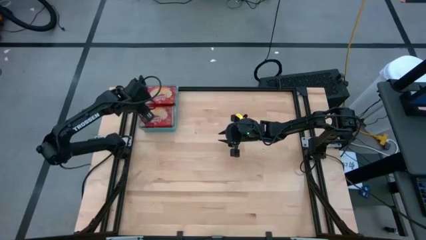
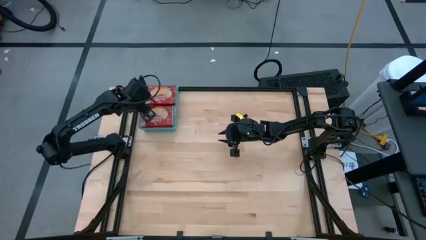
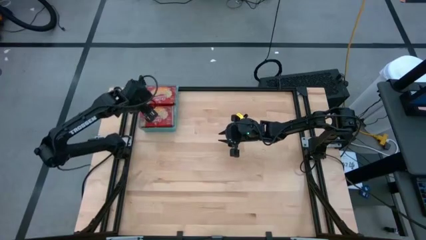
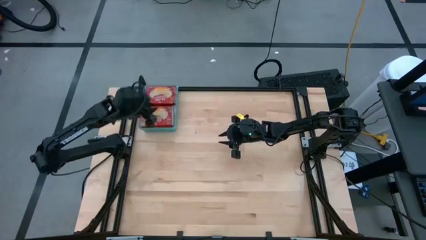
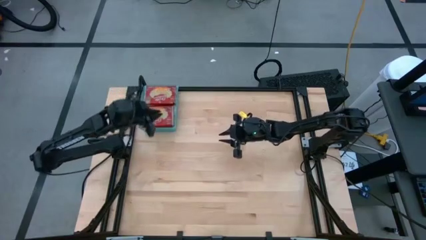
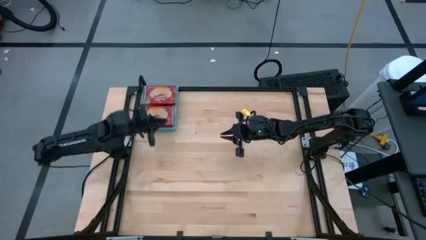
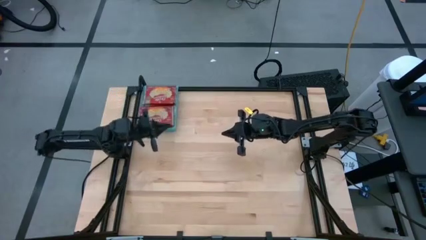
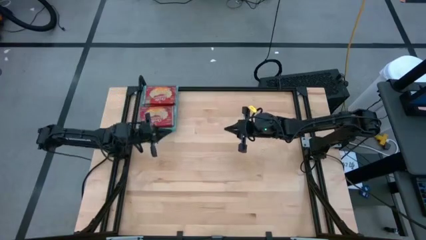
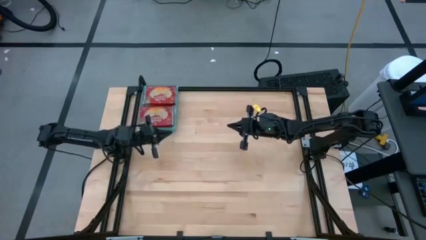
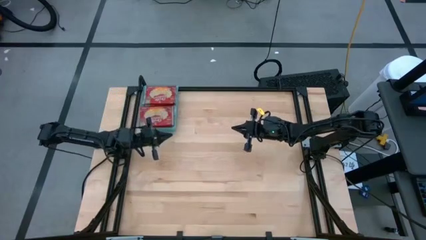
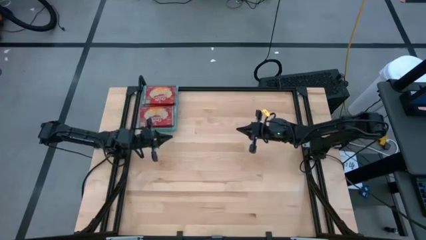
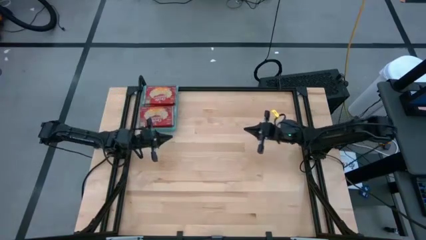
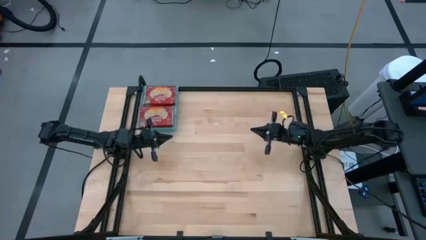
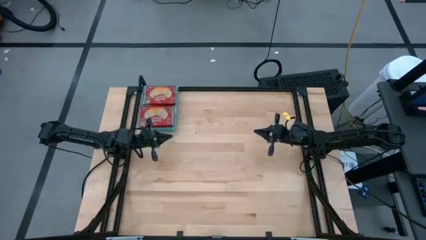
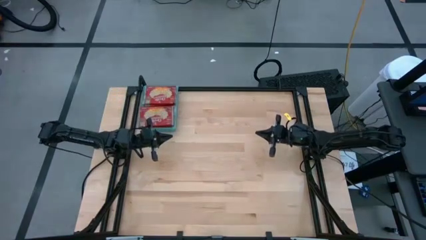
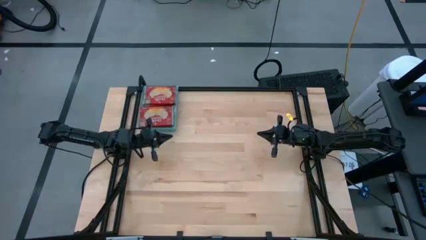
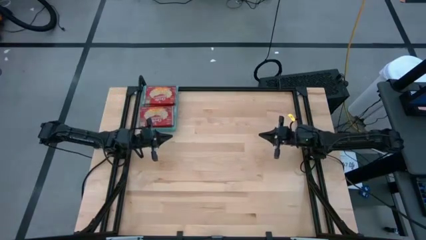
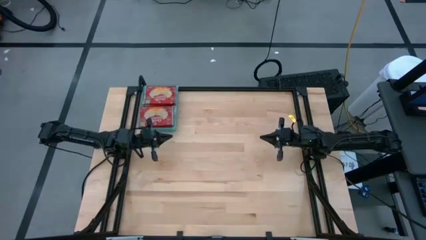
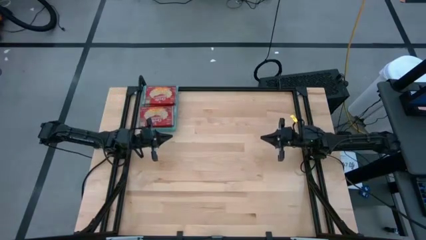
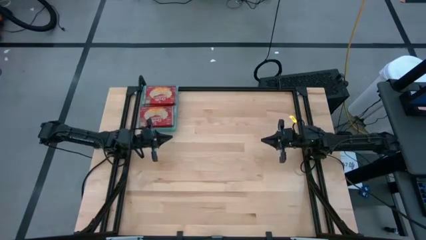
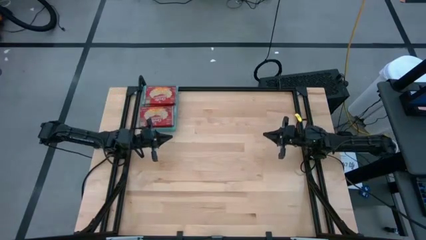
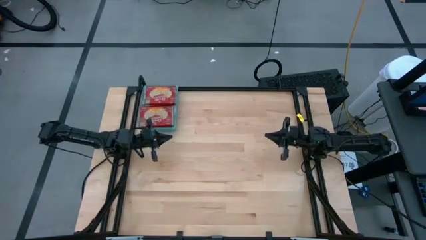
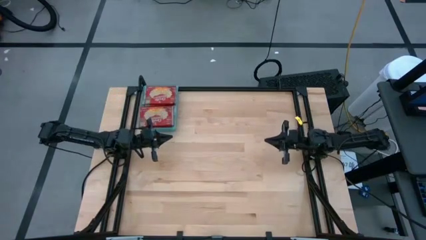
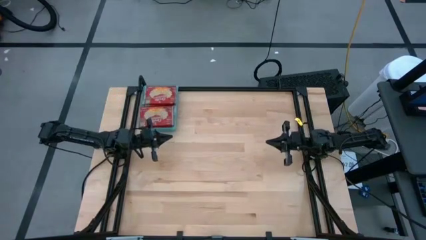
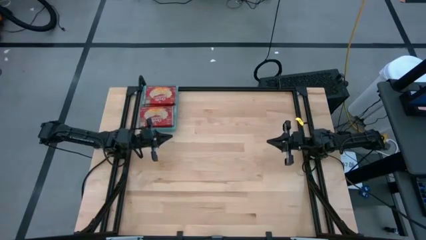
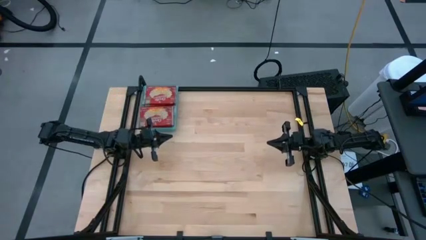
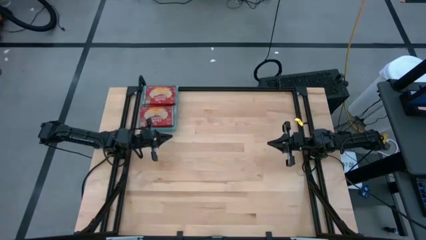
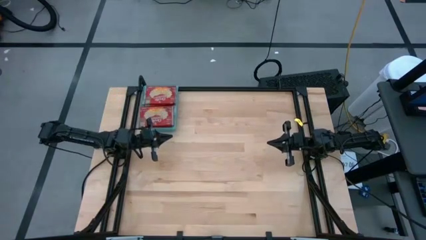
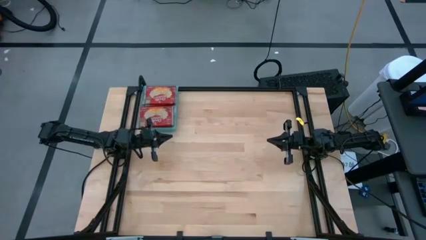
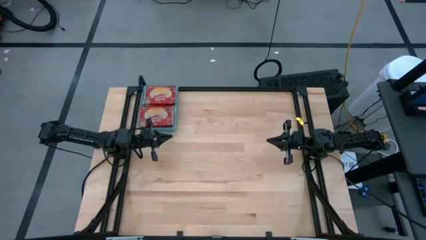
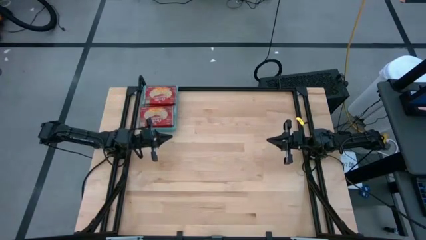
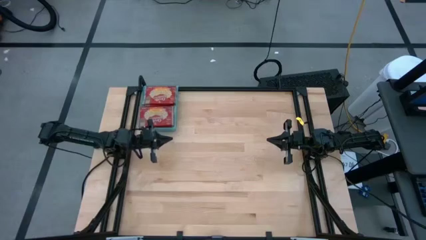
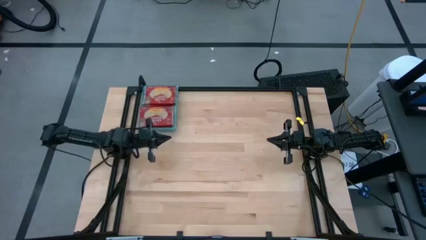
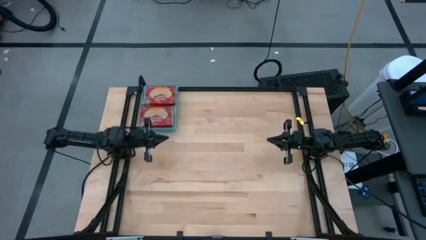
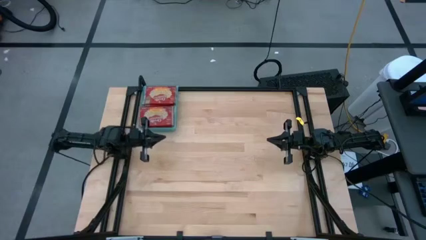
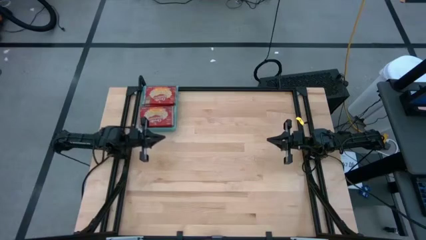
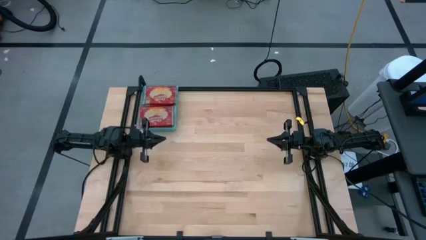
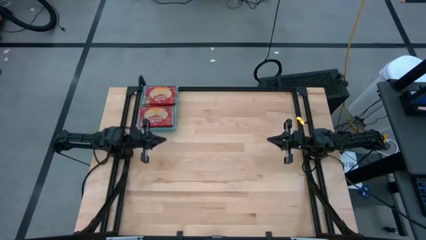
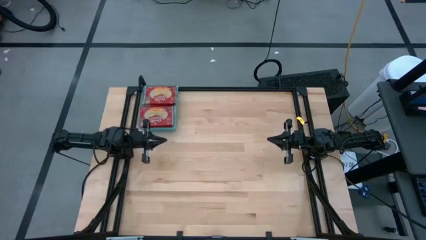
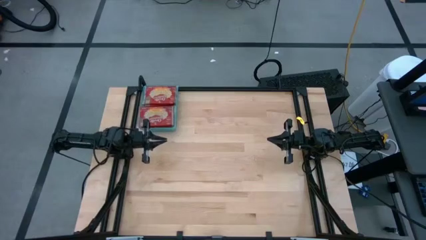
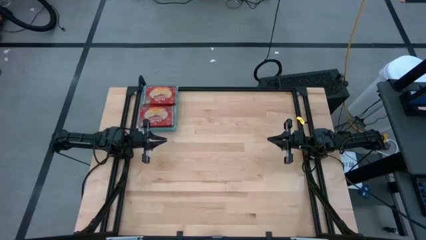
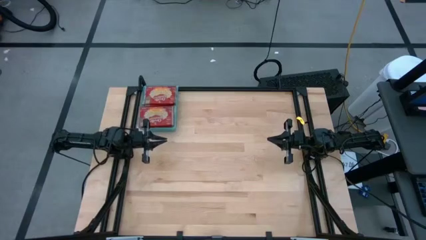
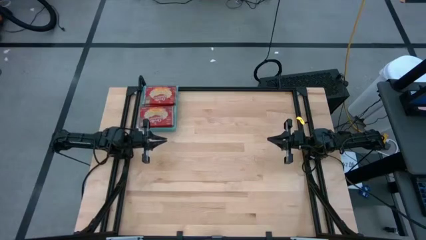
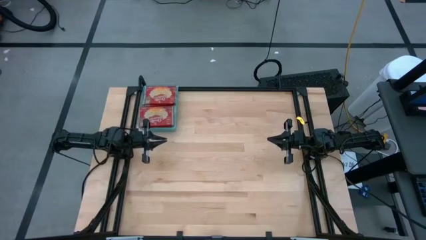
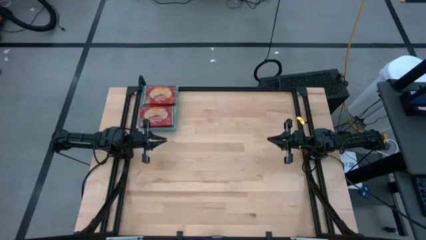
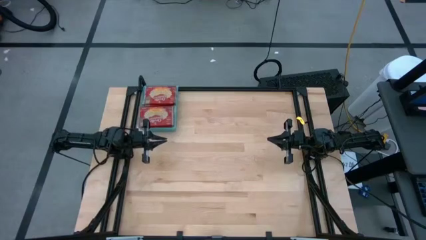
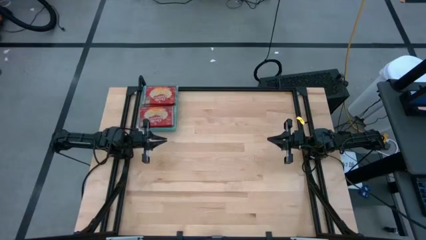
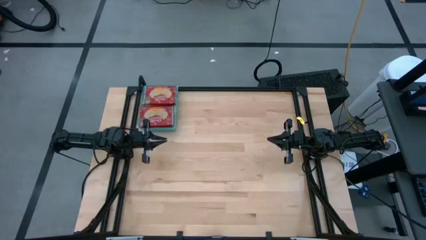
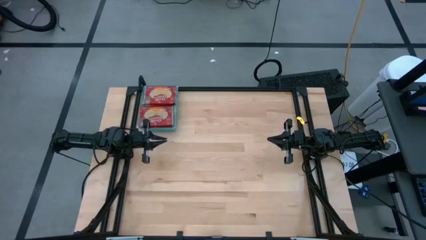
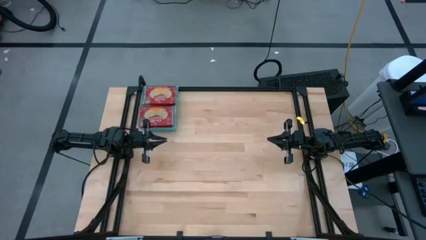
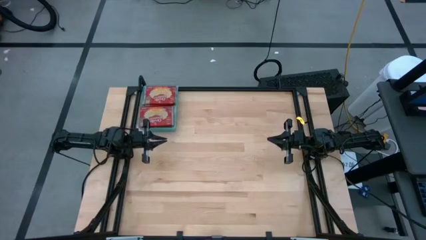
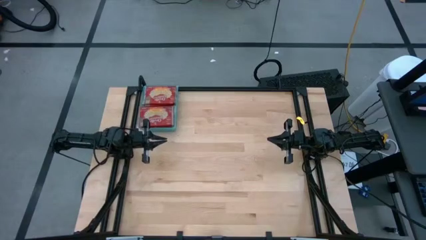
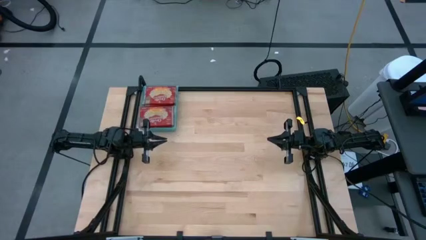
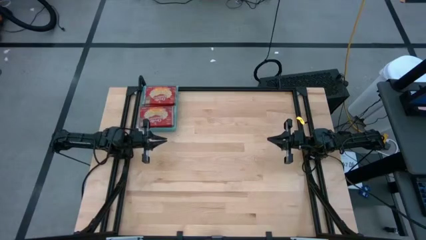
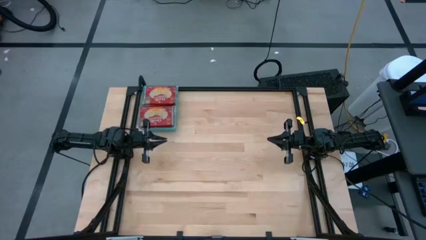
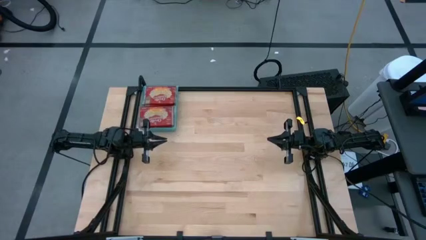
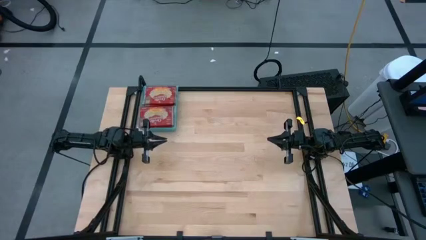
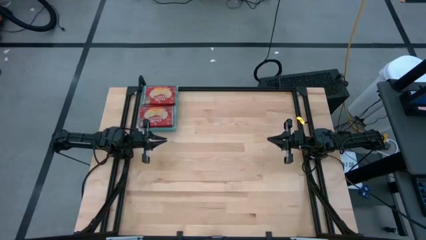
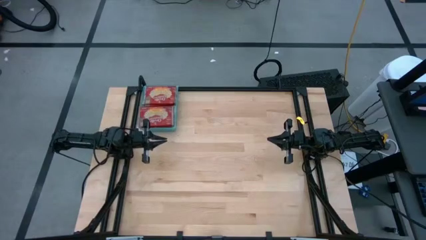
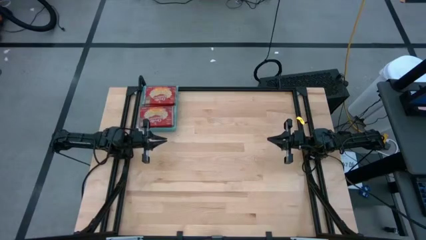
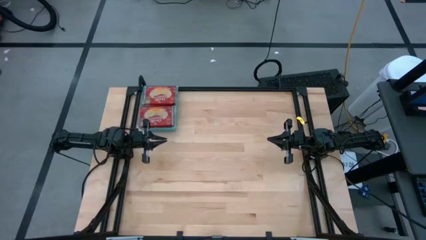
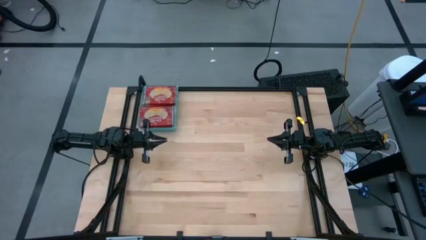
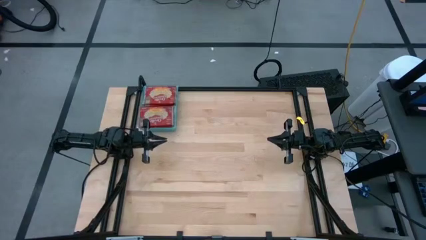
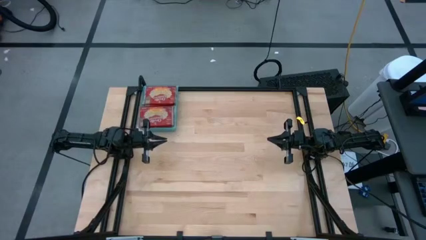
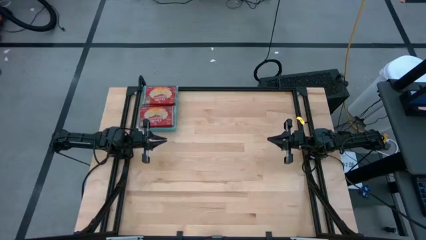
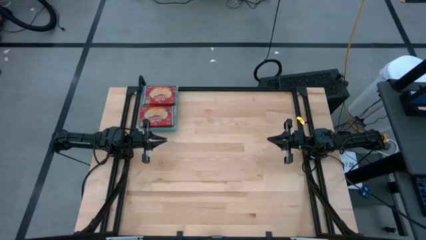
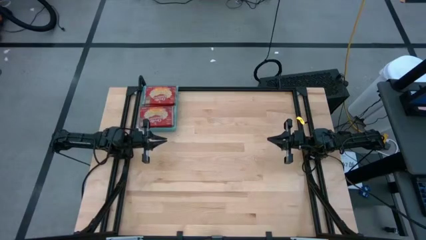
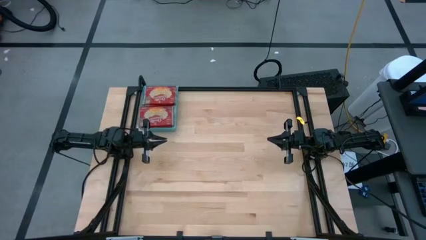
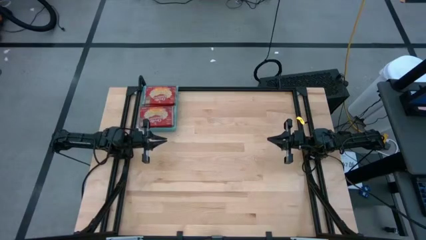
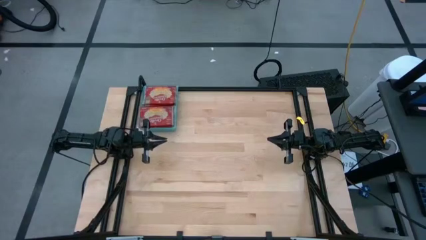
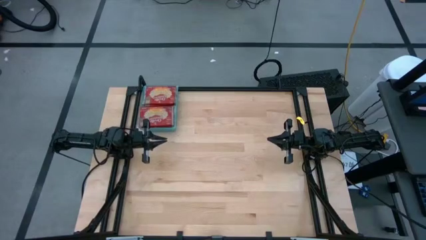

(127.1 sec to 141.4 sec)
Task: Sort popcorn bags into baskets
Return to Home Position
